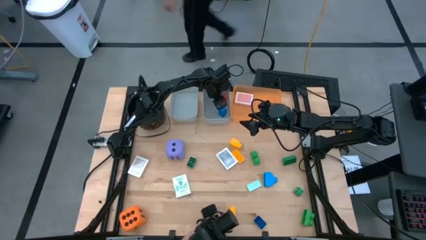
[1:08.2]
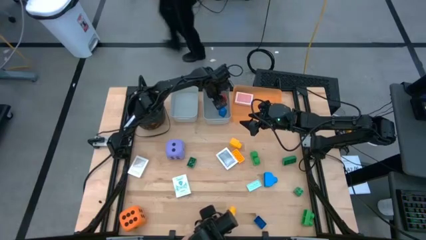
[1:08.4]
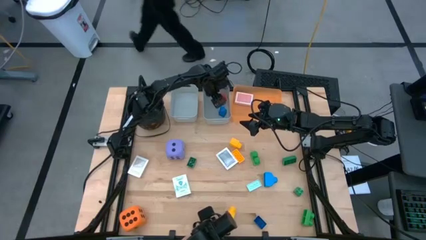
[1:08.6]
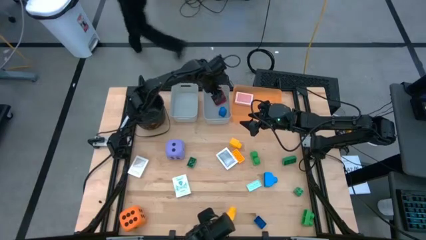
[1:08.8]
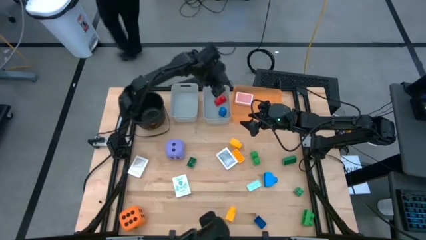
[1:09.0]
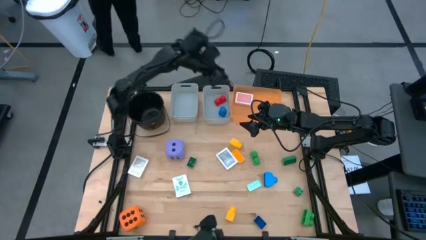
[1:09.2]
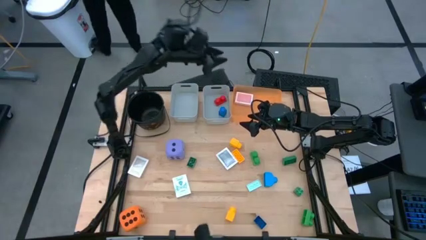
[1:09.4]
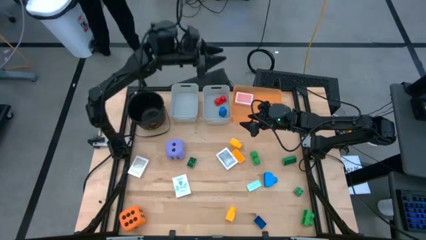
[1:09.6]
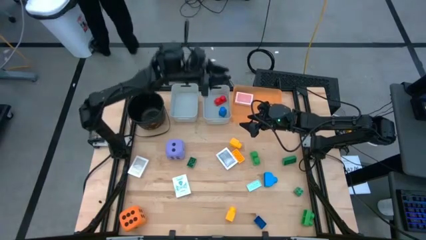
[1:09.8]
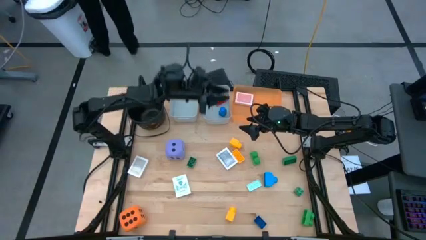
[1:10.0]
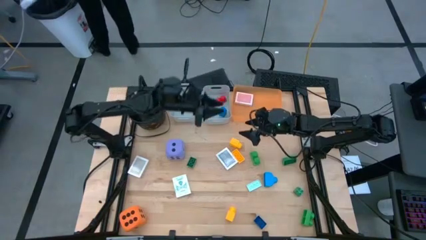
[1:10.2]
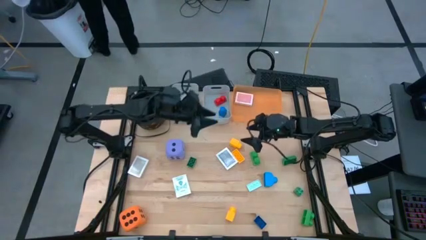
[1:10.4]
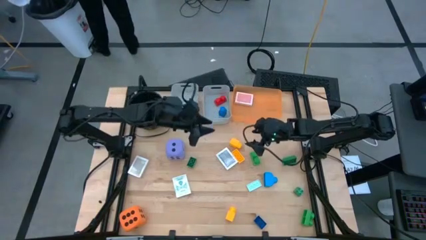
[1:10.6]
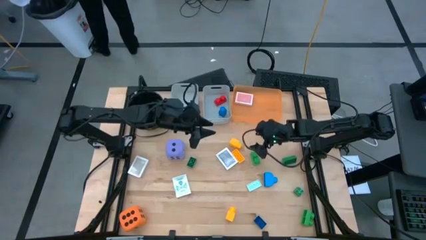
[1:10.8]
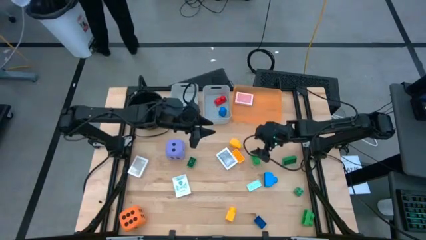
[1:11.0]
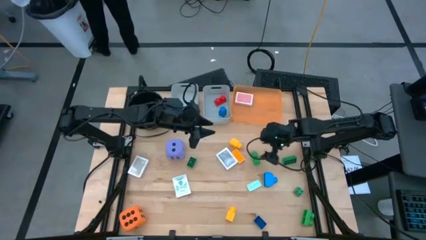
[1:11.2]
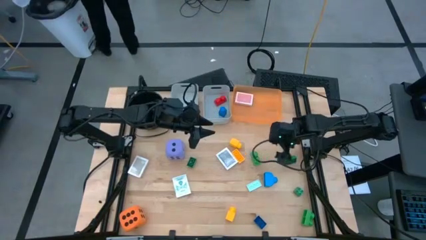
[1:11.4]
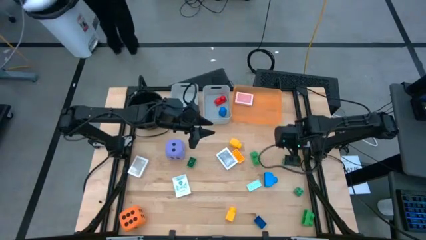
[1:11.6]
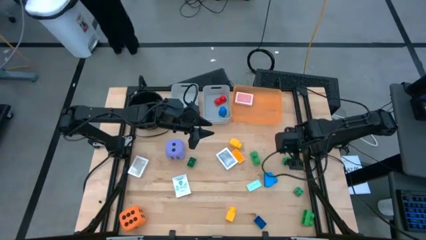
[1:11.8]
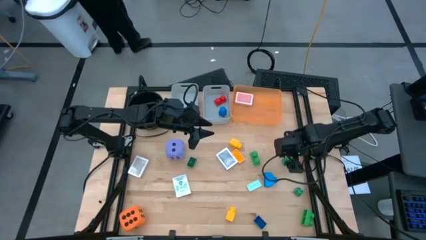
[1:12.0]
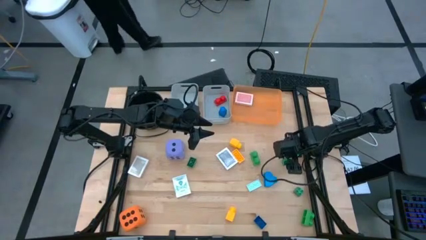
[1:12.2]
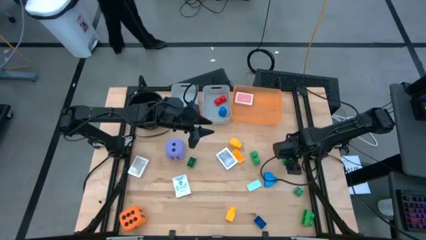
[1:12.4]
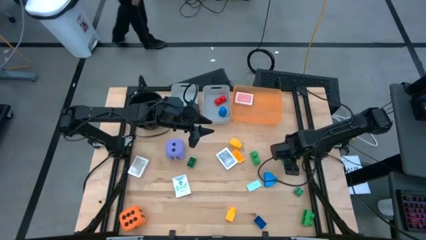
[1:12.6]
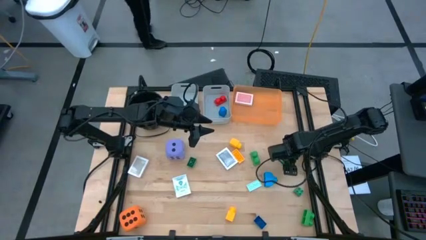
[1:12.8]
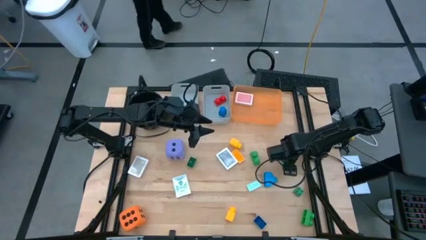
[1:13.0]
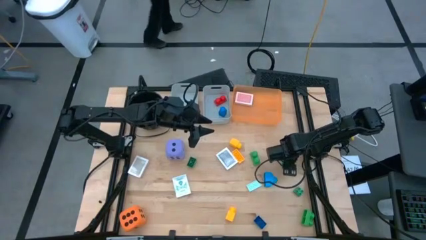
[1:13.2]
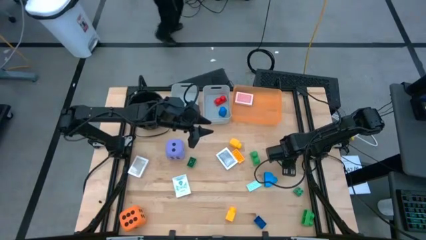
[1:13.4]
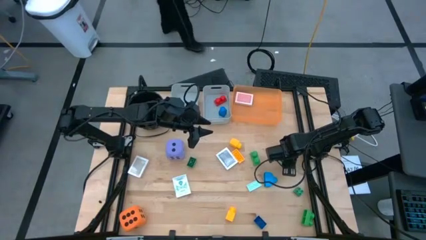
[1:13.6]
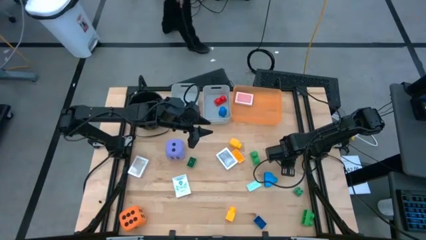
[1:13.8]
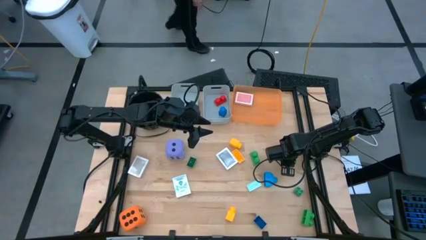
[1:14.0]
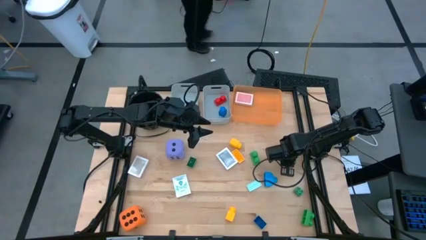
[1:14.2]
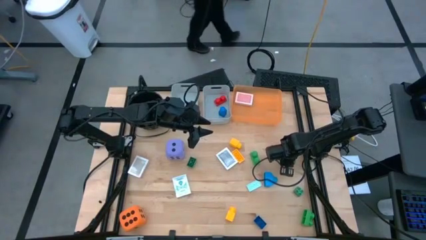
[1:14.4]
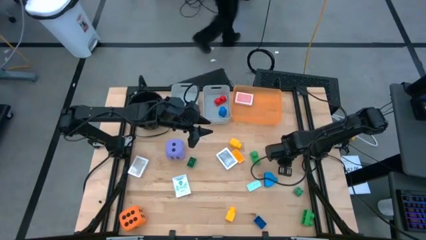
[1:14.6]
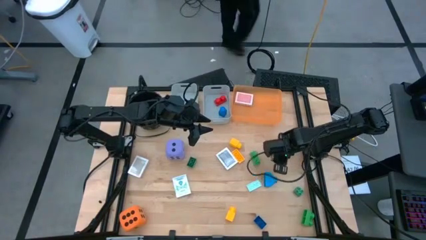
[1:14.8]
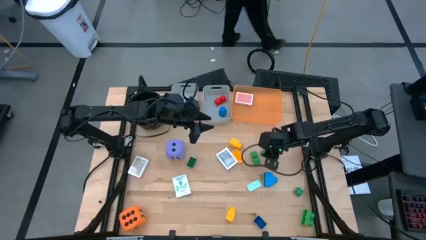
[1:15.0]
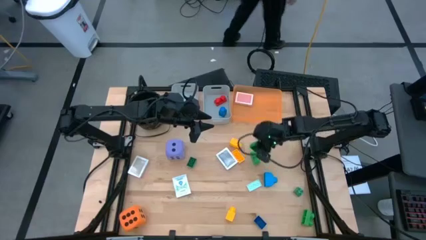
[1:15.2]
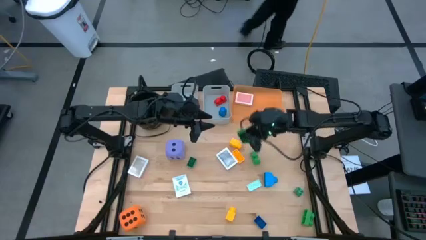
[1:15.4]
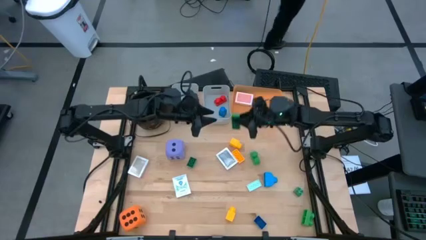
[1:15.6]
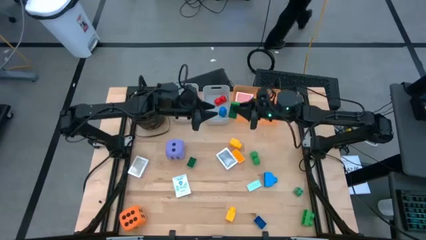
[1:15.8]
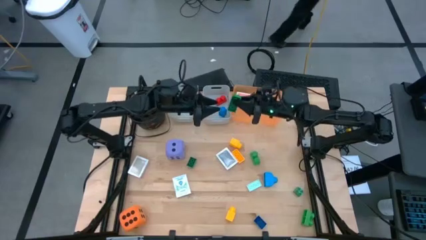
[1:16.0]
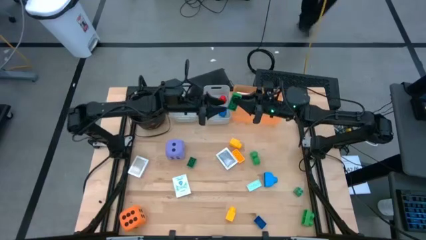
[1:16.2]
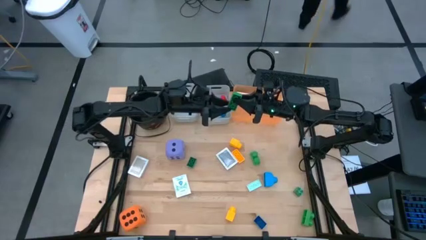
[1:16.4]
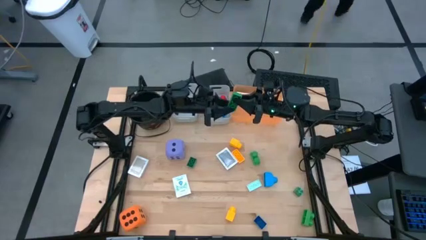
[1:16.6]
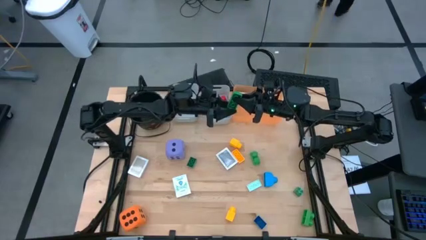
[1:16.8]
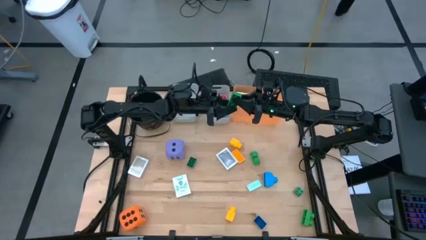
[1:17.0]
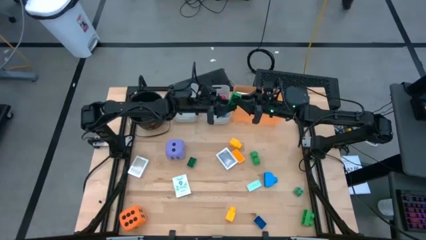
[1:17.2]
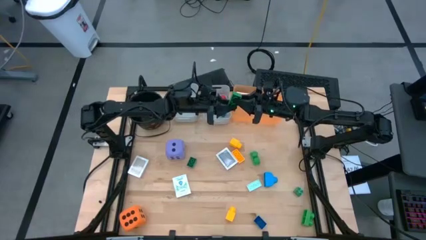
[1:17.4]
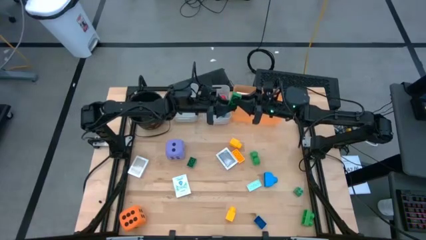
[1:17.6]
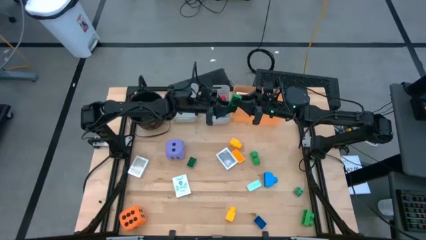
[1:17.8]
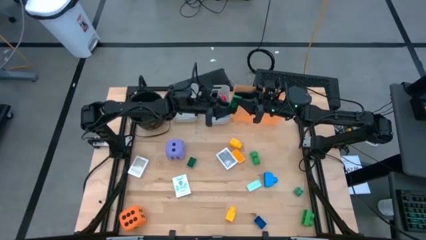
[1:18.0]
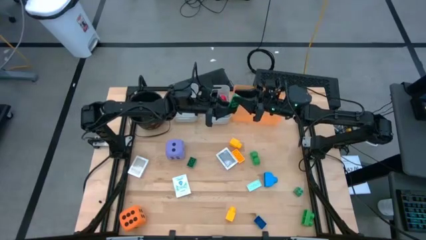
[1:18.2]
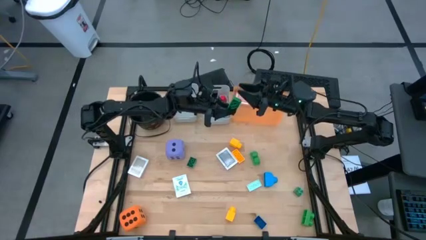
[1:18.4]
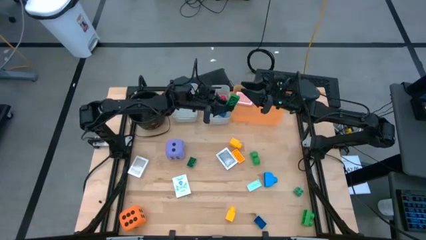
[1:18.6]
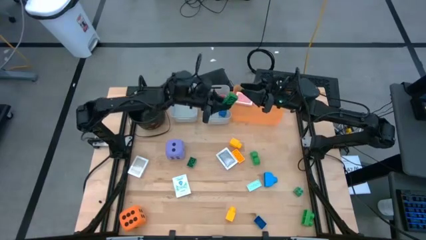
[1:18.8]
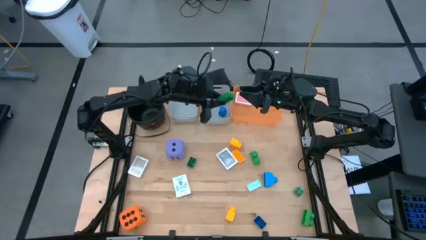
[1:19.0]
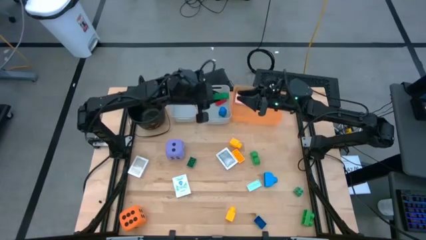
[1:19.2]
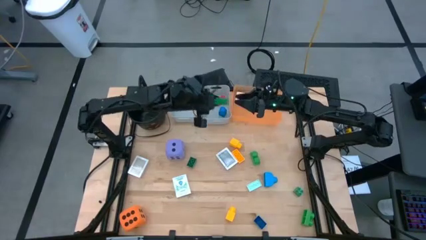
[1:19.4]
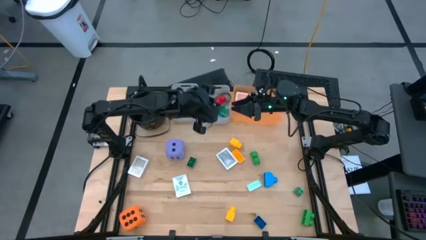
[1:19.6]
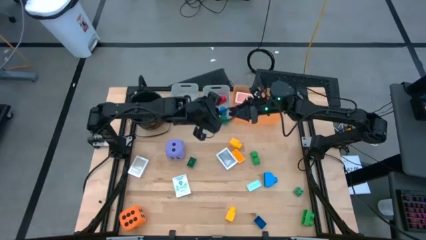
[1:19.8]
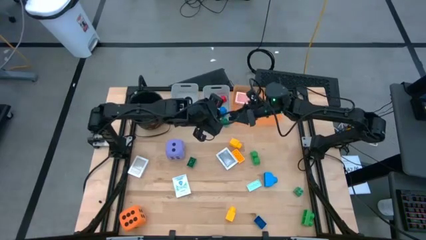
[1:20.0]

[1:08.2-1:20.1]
Task: Pick & Place Toys
Put the green gamepiece into the right gray bin
